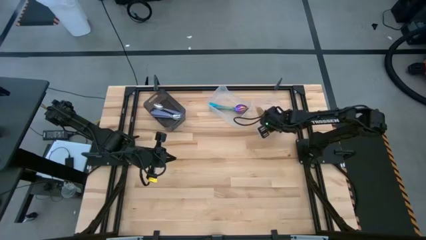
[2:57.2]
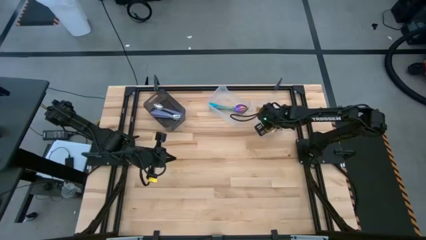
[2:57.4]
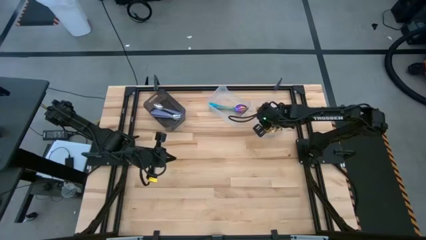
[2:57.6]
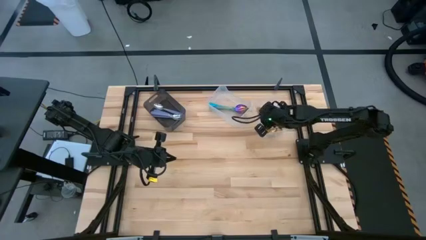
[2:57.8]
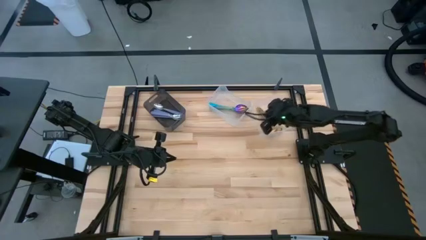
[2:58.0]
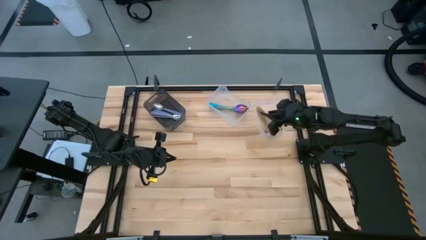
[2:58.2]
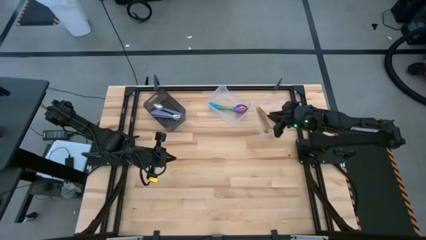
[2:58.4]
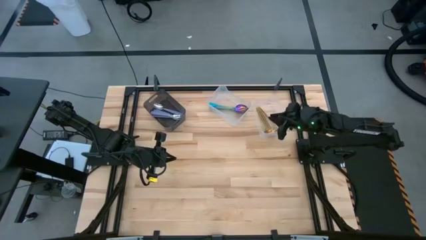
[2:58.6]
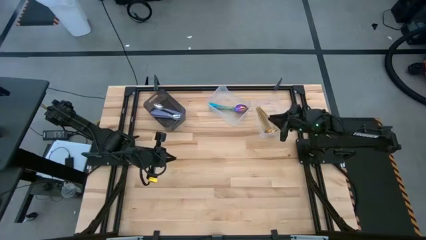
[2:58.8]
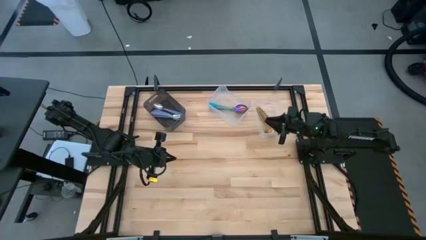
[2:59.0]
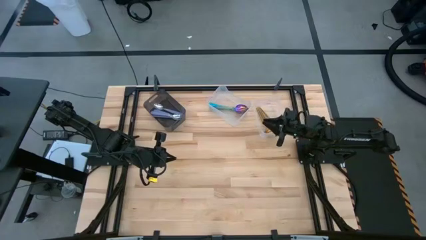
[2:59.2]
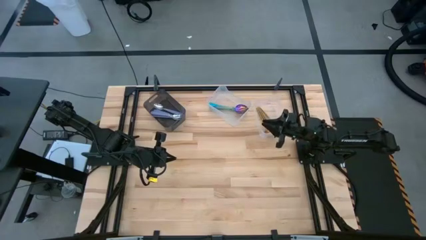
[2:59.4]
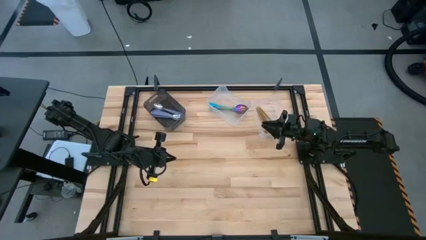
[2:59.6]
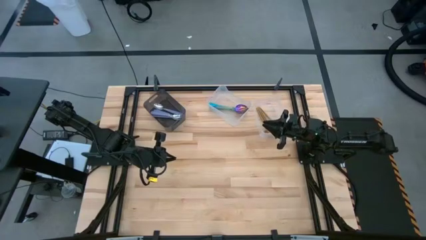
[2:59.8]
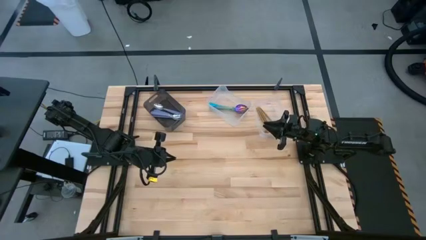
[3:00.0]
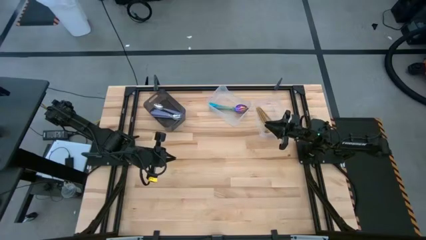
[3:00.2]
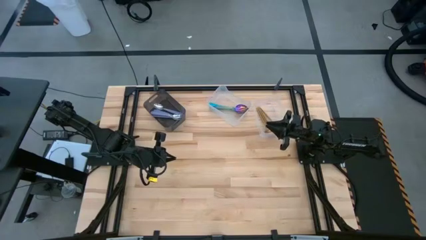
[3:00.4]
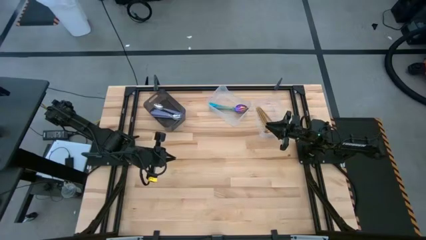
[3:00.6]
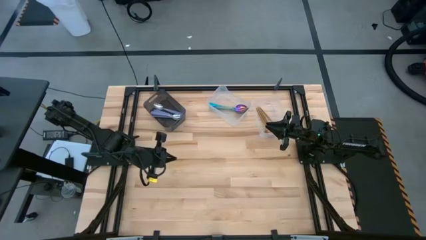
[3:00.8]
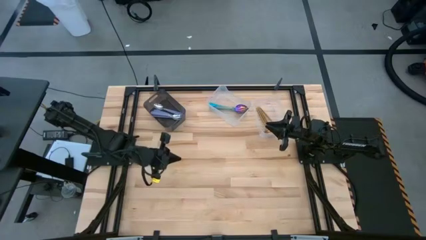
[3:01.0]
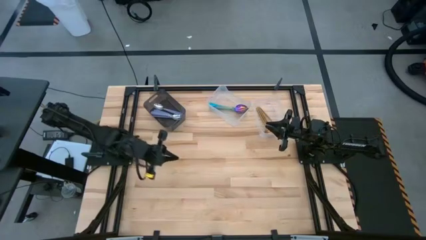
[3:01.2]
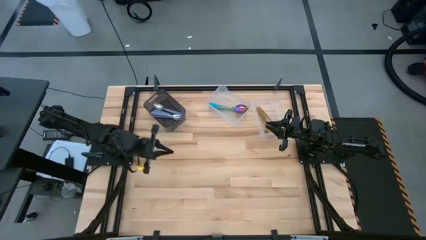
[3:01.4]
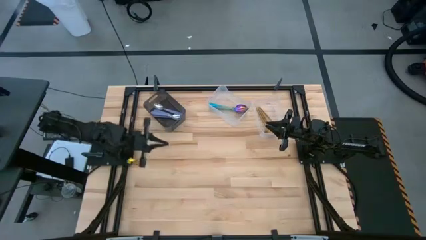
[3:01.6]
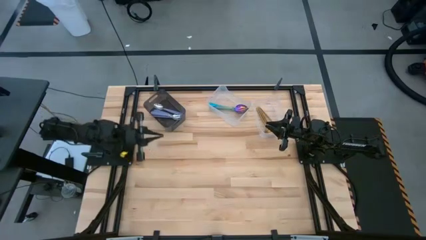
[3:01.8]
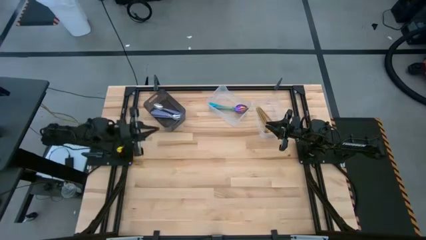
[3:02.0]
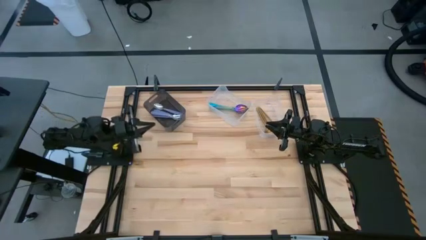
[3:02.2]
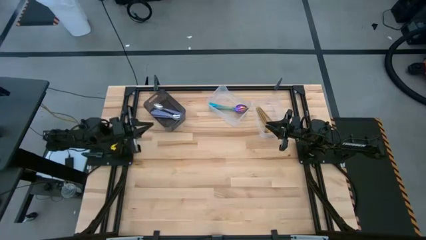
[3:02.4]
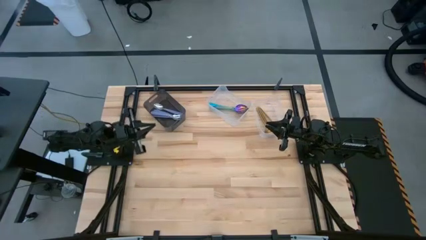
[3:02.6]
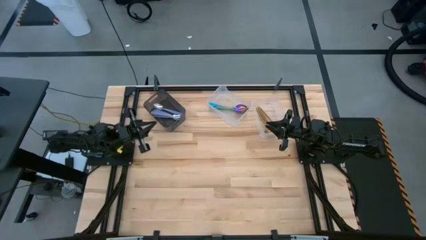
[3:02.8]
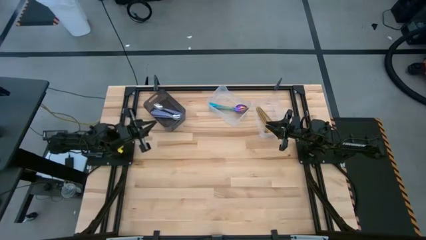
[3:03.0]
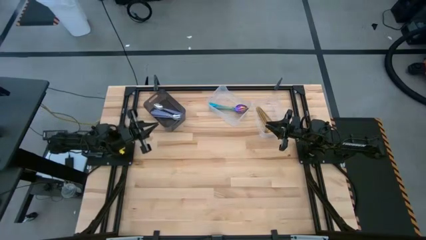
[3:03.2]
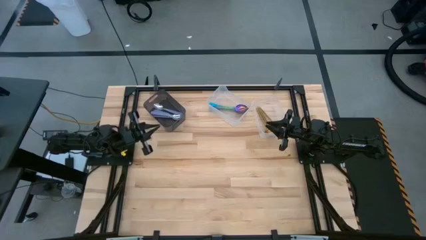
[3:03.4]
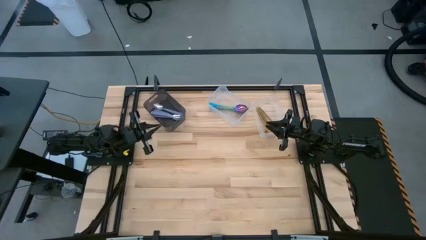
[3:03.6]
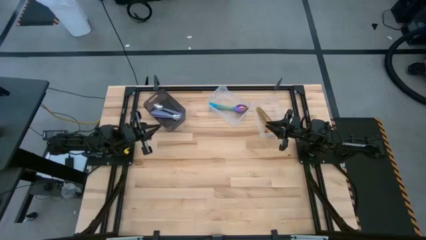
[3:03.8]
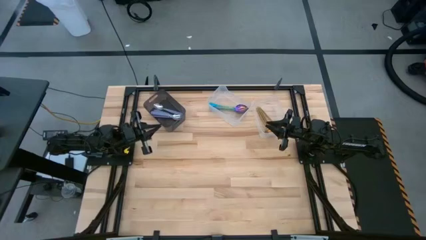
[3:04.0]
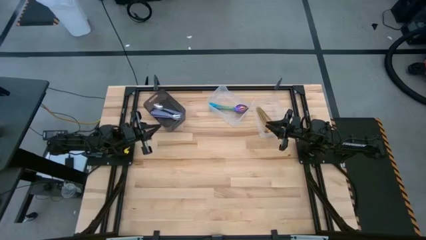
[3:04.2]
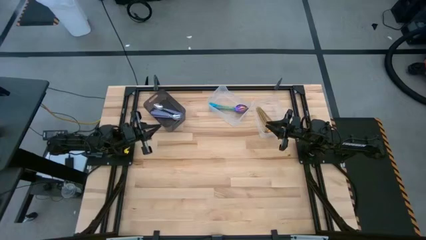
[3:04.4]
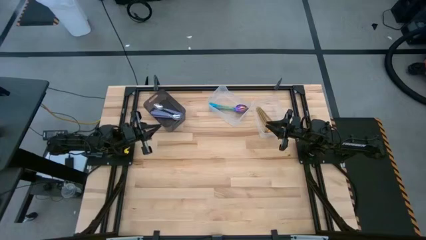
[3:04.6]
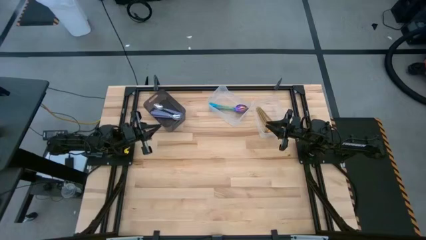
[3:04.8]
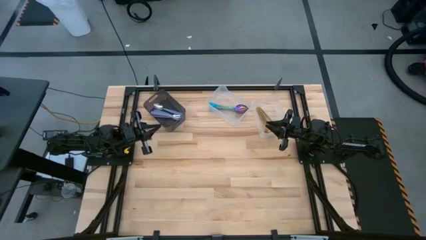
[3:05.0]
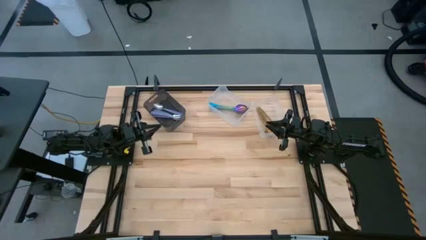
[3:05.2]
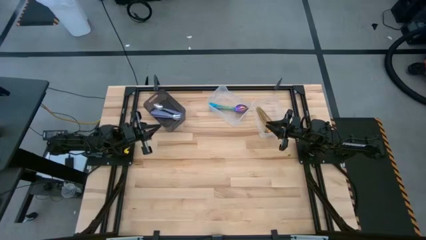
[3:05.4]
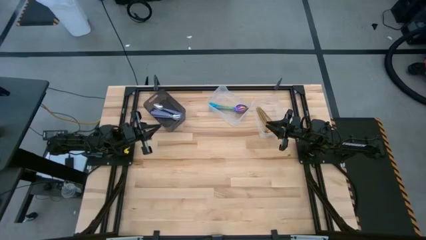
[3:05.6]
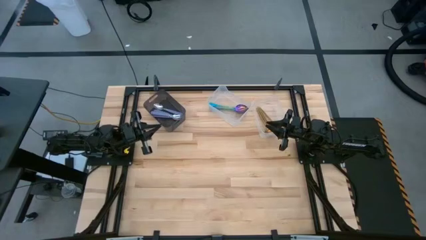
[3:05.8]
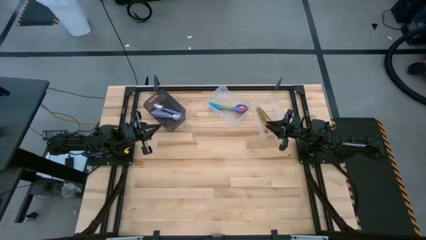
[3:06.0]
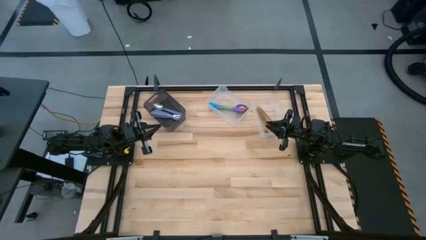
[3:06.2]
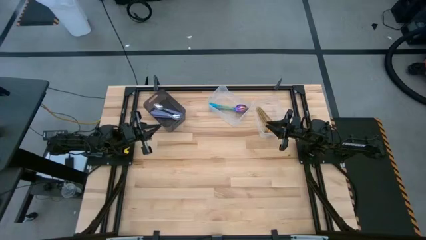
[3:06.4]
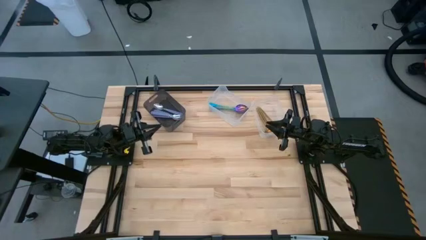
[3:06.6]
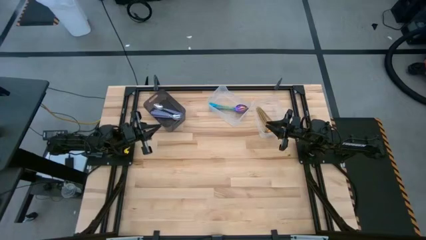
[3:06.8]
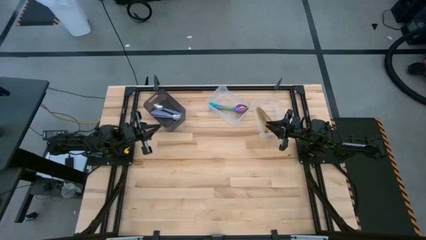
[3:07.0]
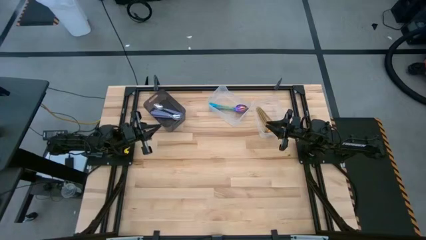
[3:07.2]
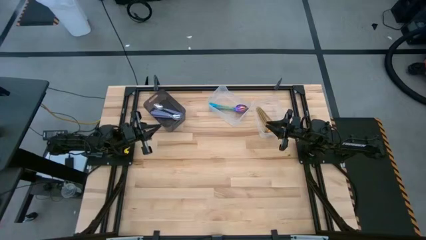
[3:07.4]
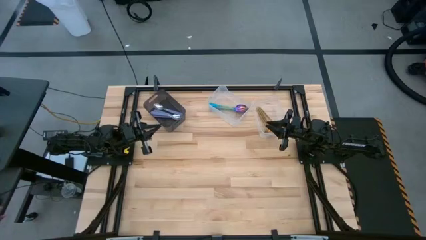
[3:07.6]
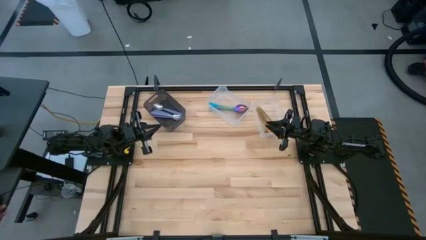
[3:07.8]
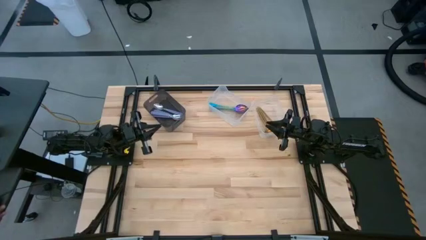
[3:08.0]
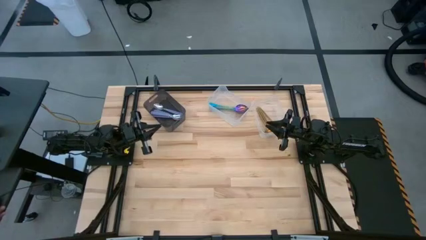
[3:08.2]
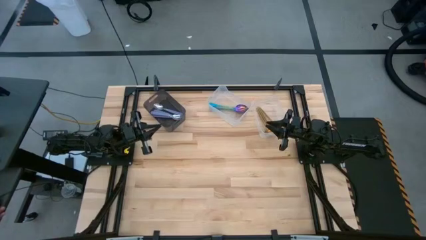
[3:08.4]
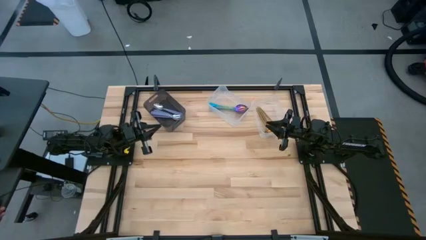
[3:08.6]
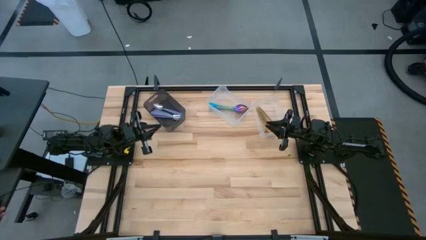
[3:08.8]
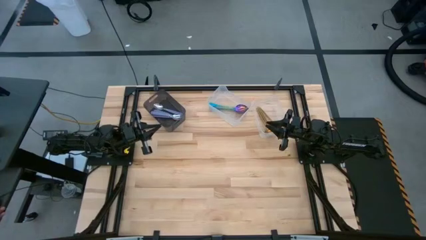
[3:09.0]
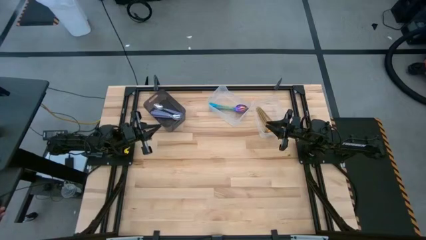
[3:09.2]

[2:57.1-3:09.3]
Task: Sort silverware by color (type)
Return to Home Position
